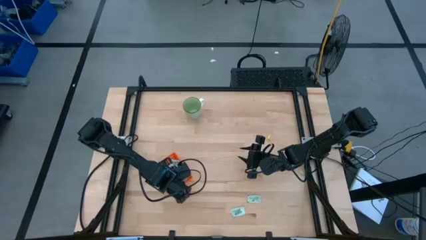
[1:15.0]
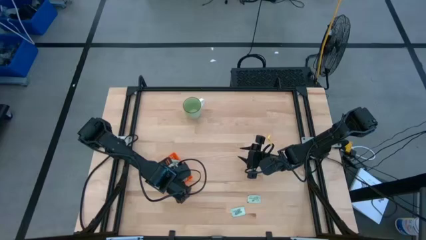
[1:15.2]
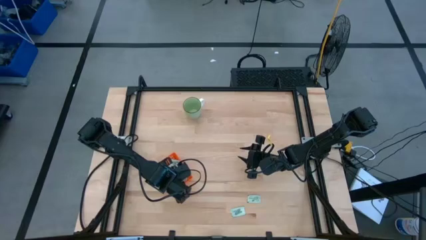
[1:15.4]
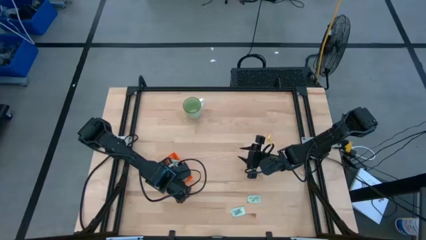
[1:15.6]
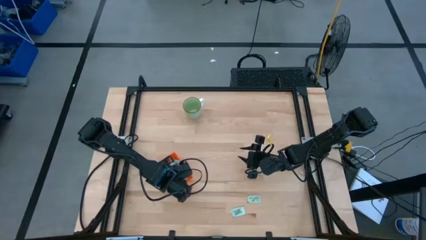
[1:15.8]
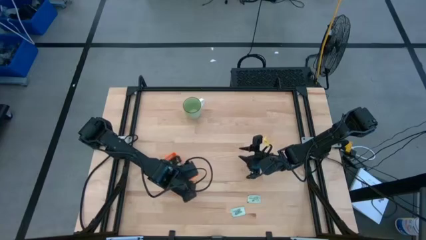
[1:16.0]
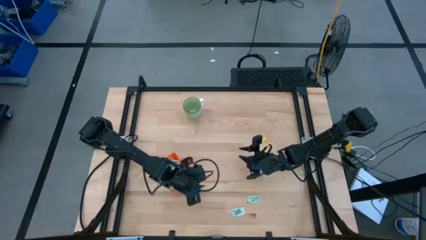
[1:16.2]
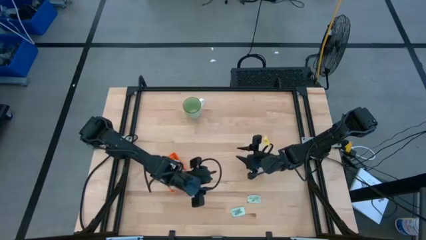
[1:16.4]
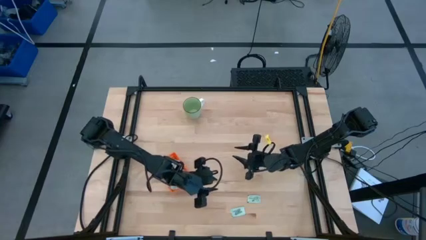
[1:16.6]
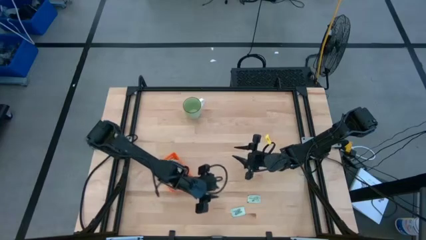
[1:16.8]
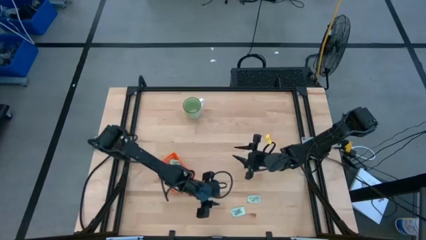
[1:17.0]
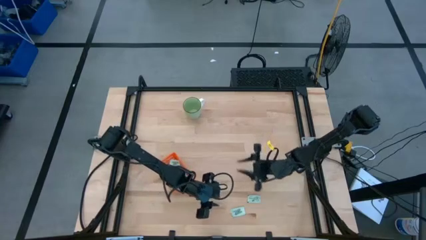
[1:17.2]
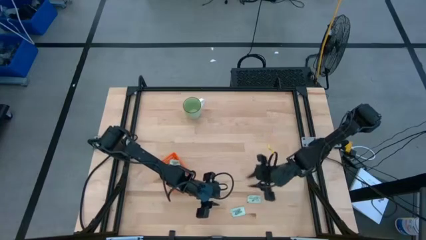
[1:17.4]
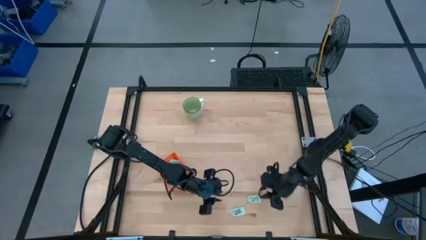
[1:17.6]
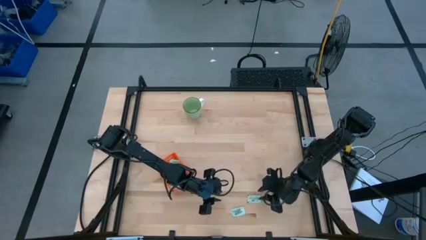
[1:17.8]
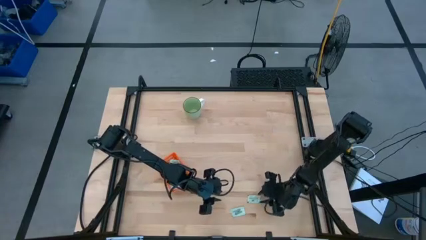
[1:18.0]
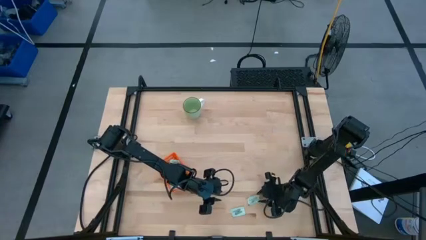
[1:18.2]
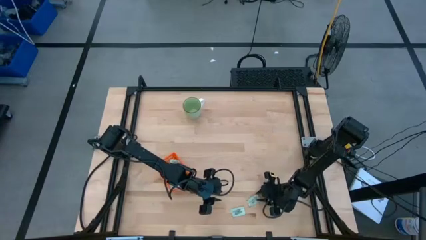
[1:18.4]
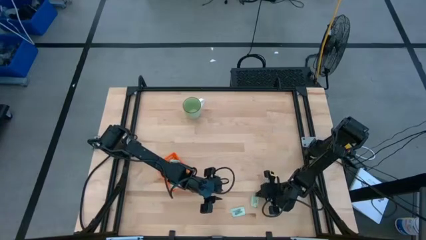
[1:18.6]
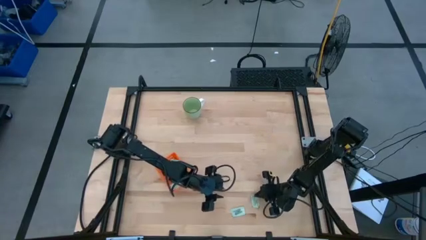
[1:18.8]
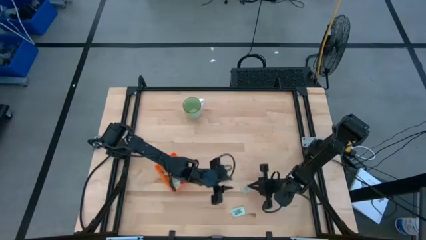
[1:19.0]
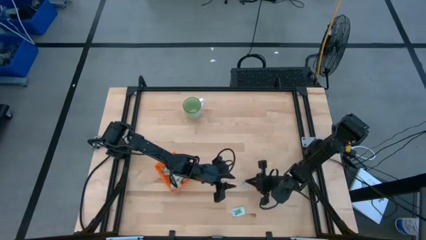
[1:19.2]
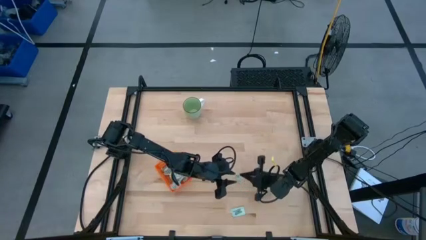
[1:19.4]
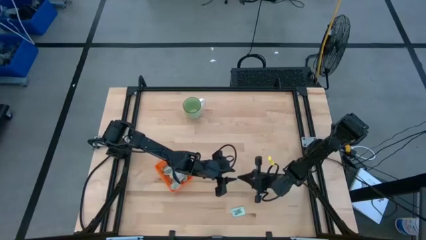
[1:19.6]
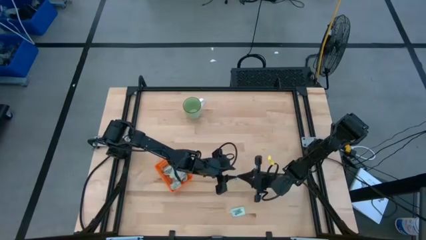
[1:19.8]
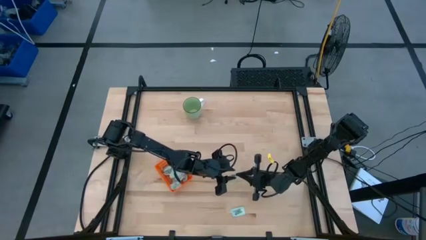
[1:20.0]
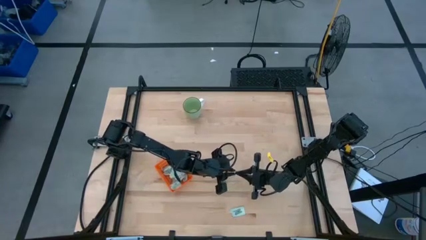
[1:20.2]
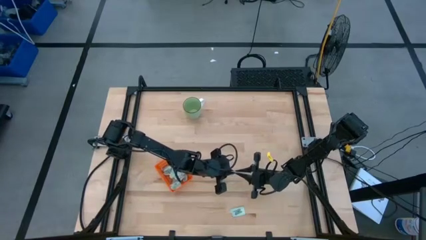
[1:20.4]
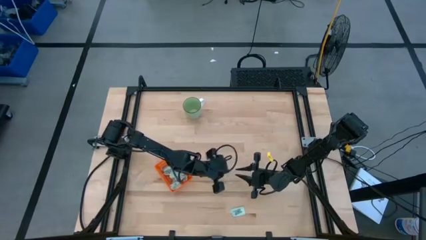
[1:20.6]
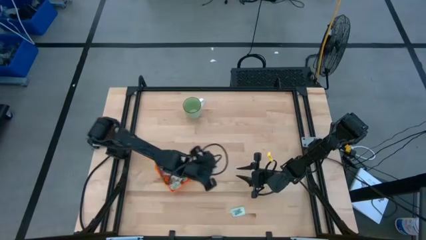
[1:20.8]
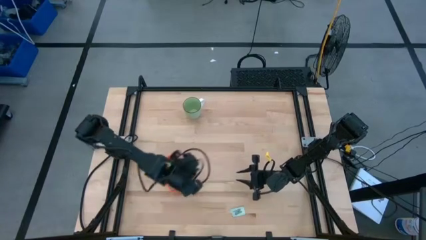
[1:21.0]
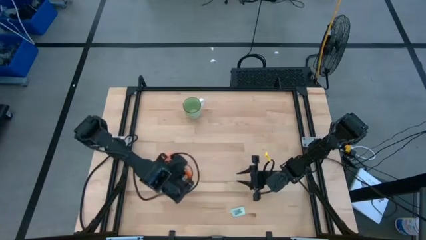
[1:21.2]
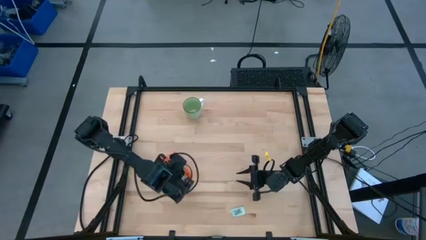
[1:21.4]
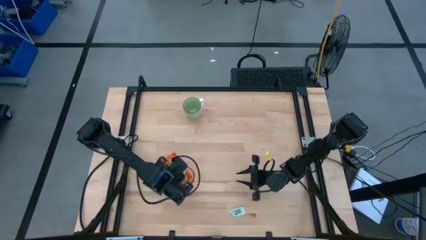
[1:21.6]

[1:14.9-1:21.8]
Task: Pick and place Stevia / Truvia into bins
Put the stevia packet into the orange basket

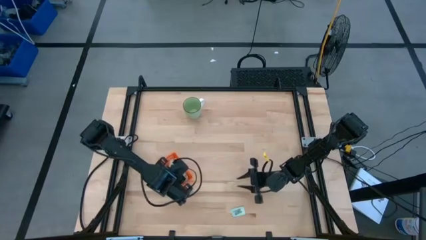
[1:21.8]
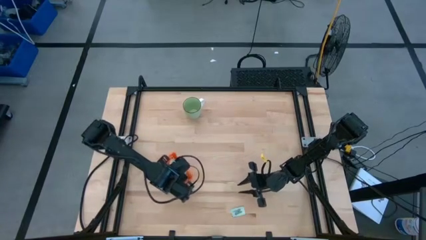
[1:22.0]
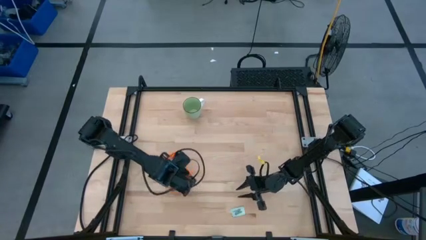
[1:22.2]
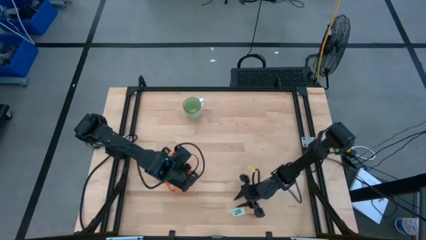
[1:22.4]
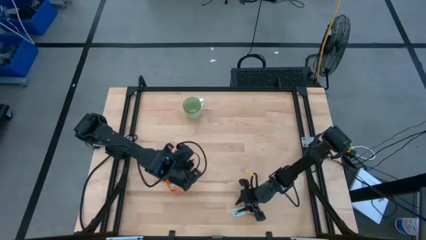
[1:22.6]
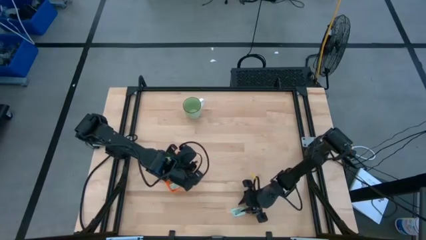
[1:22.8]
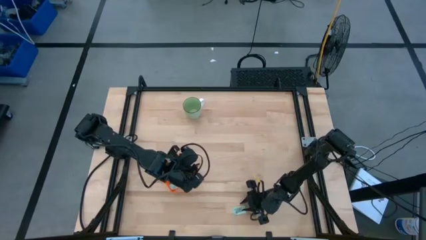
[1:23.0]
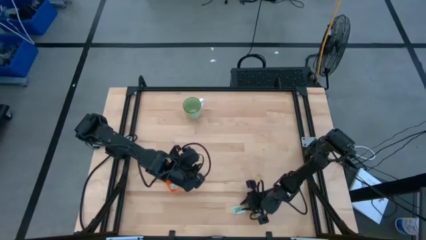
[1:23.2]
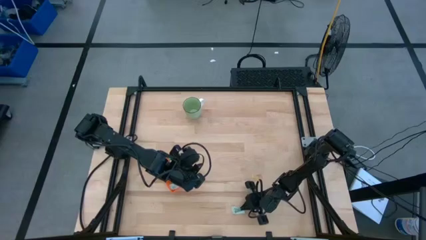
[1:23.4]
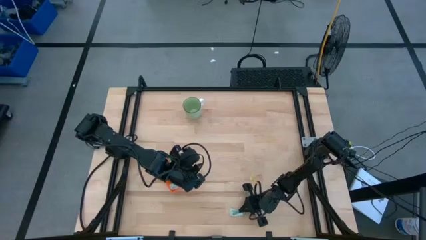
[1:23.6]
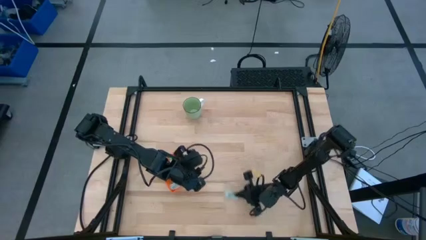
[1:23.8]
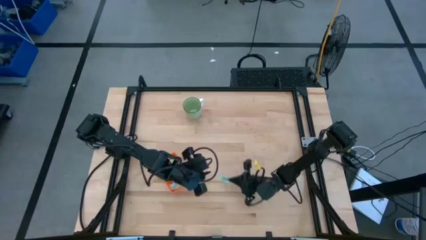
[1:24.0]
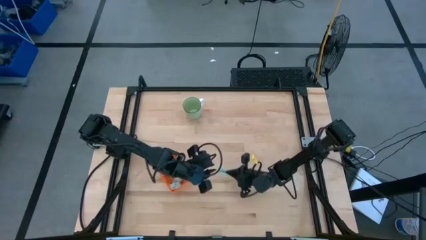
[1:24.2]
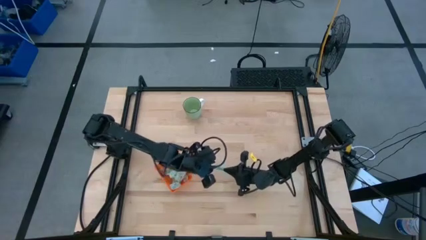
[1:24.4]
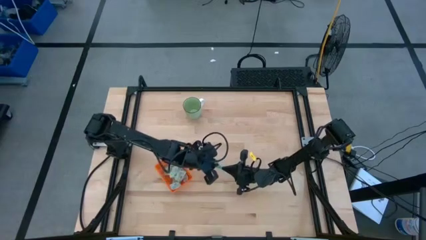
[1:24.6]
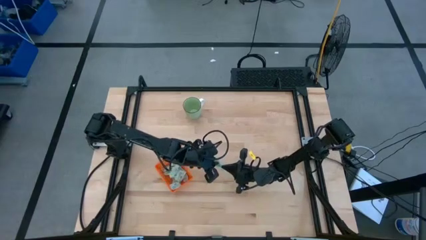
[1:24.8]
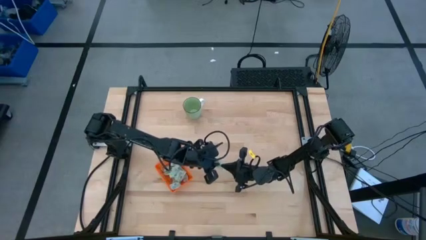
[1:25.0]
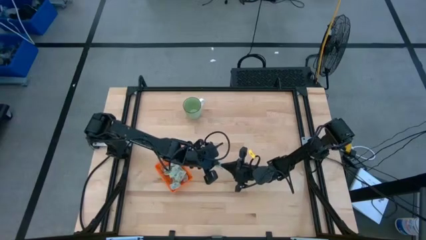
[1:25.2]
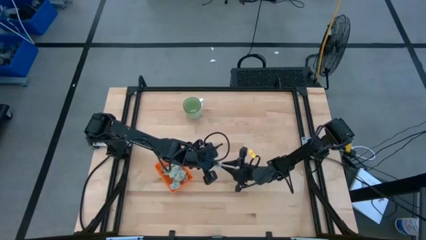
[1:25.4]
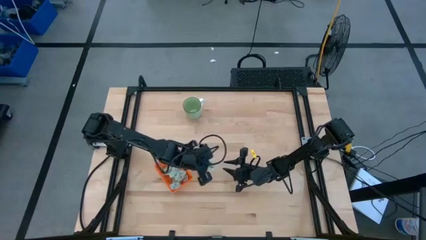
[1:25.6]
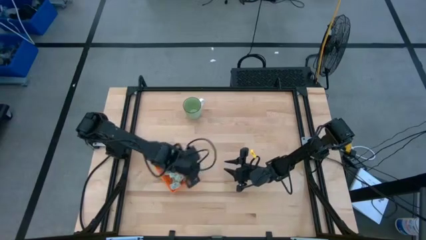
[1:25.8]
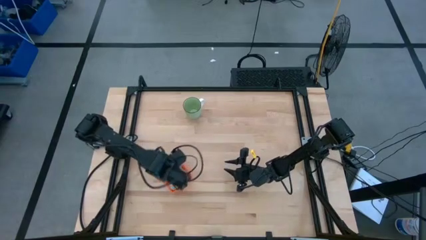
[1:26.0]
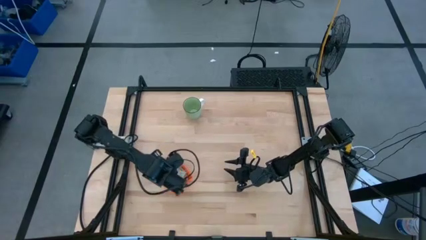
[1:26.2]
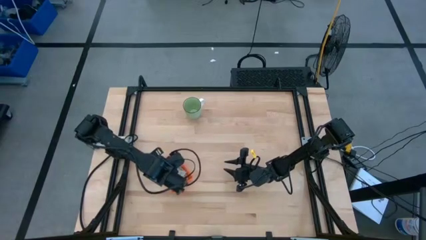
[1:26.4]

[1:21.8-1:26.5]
Put the stevia packet into the orange basket

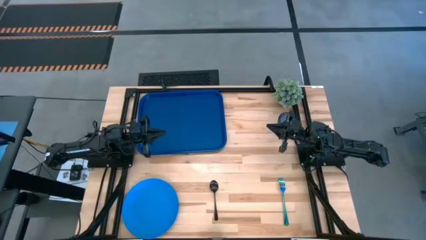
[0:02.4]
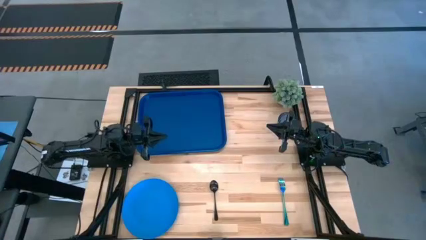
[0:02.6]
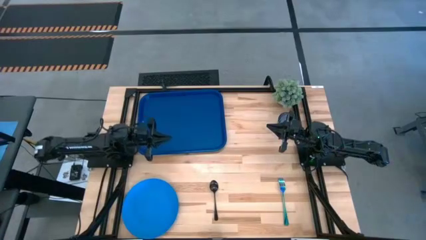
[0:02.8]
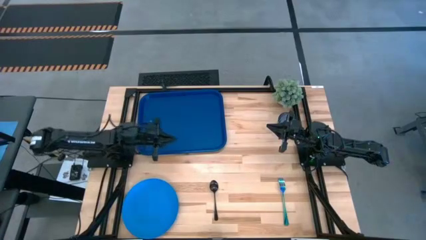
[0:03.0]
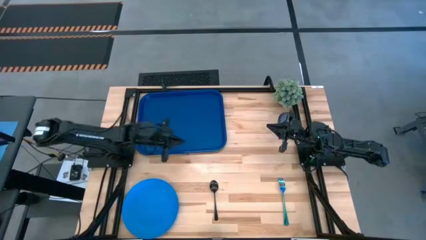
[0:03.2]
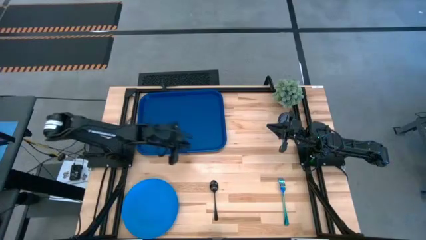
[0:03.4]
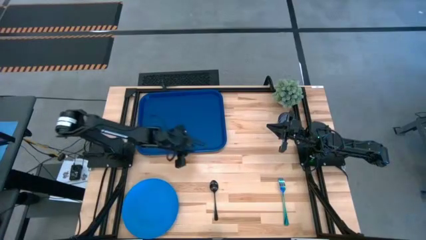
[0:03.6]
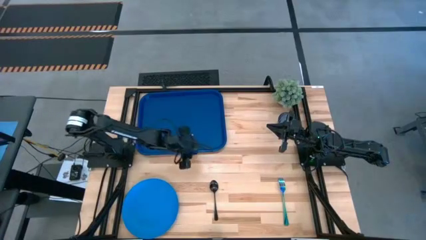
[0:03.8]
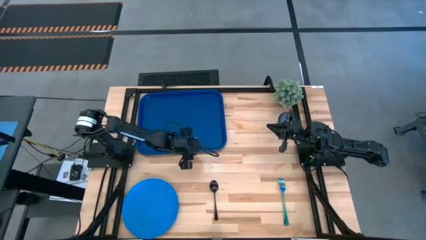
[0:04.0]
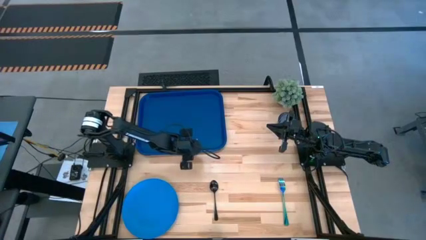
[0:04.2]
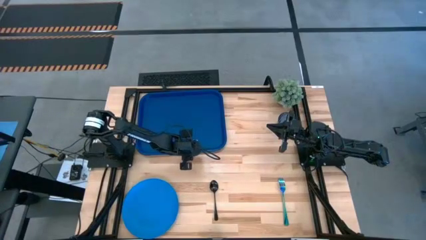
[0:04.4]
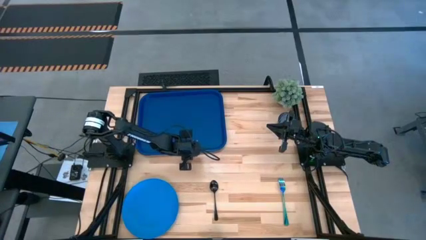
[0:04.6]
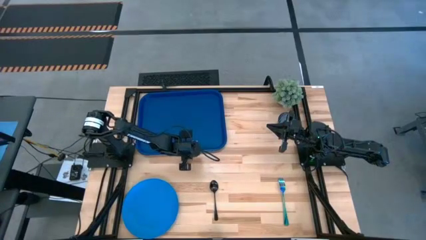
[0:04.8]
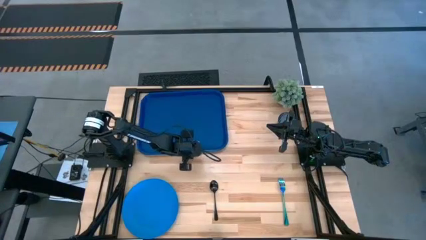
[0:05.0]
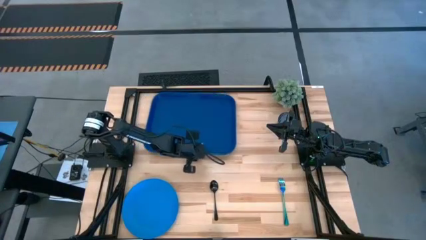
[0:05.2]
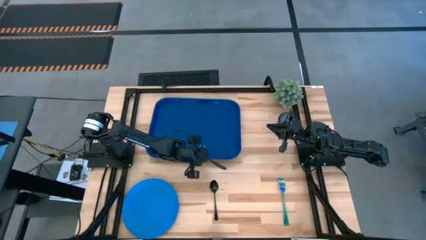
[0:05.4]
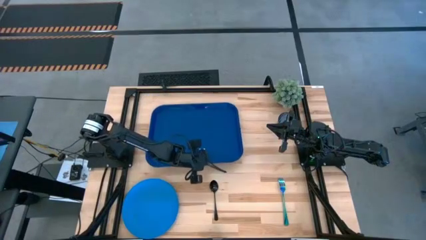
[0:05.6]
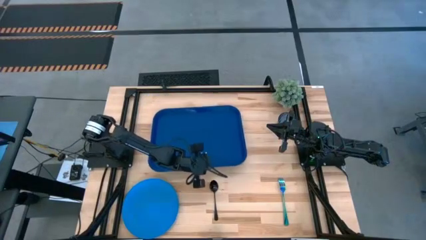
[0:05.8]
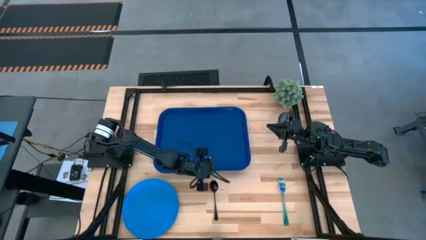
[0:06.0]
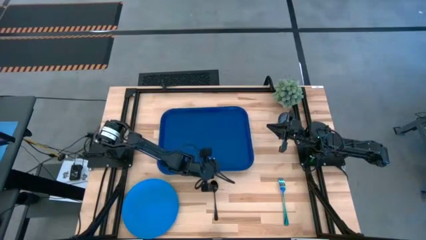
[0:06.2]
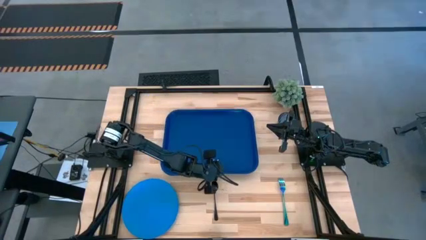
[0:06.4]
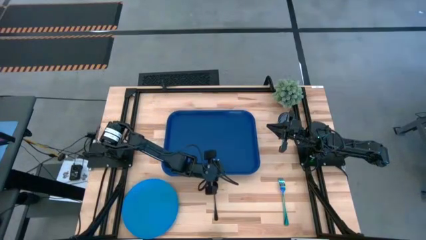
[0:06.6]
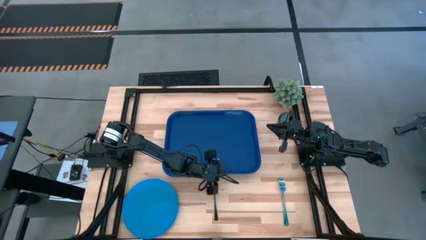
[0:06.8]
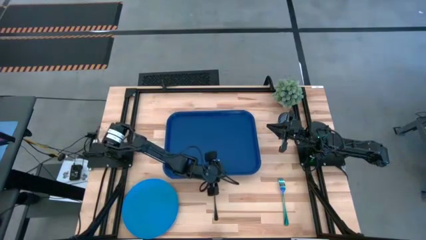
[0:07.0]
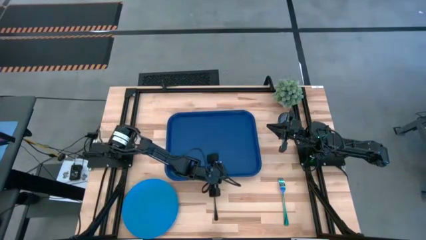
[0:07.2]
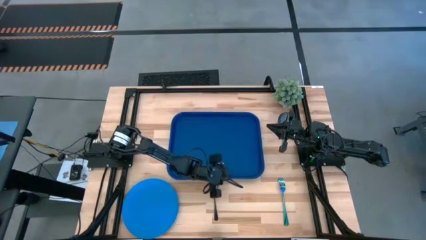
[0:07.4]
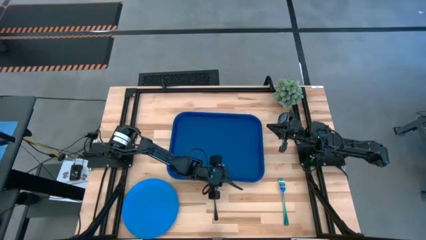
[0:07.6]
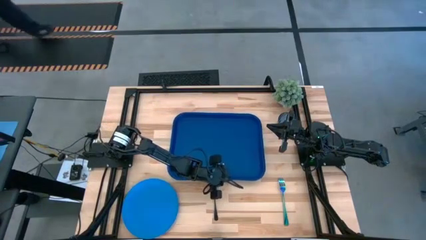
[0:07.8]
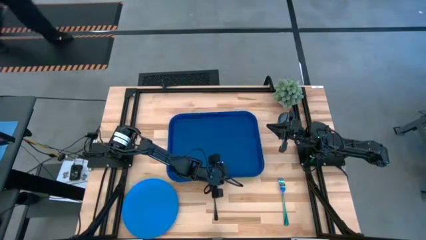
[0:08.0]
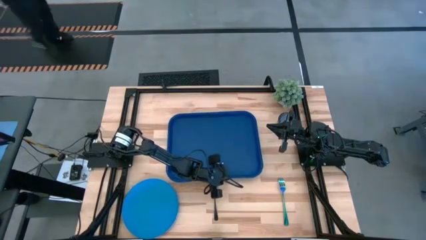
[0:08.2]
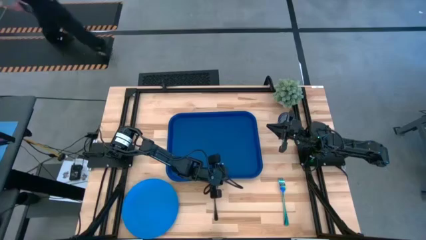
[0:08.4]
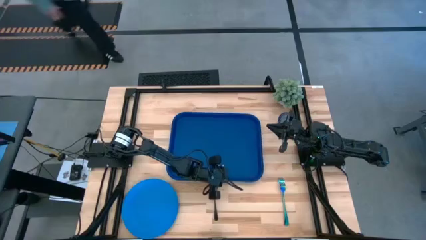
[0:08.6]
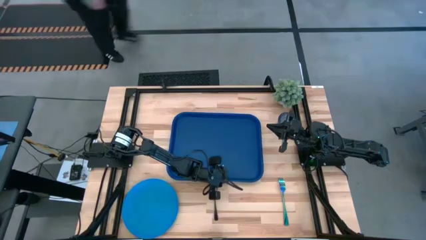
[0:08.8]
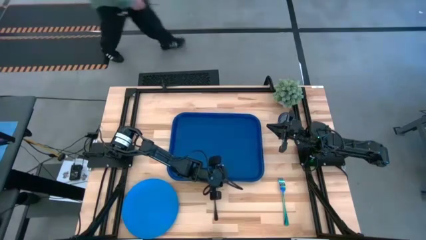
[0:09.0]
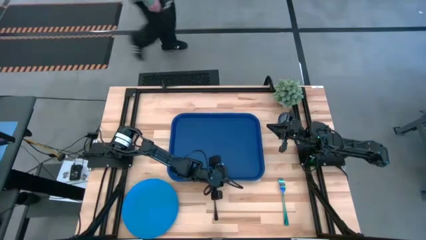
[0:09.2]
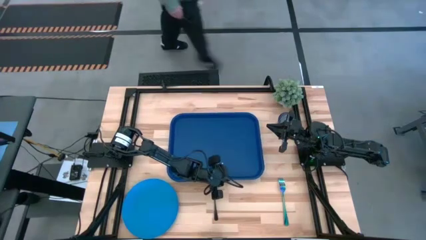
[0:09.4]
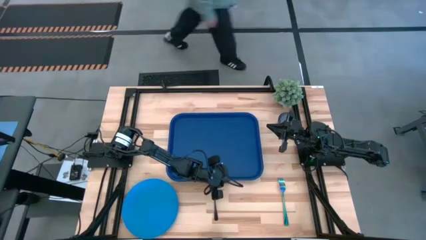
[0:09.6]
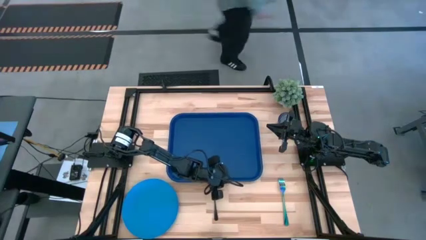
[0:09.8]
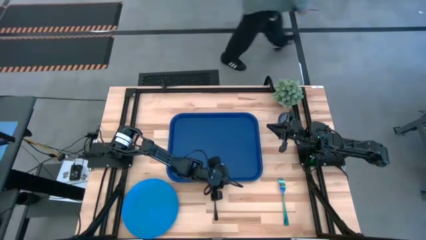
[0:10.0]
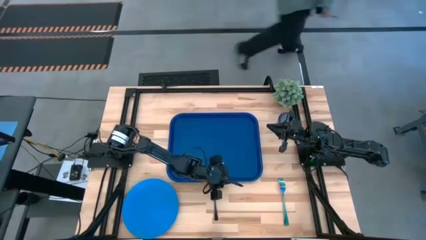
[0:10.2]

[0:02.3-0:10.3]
Task: Pick and place plate/cup/fork/spoon on tray
Prepare the blue tray in the middle of the table
